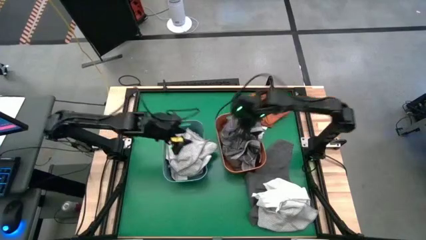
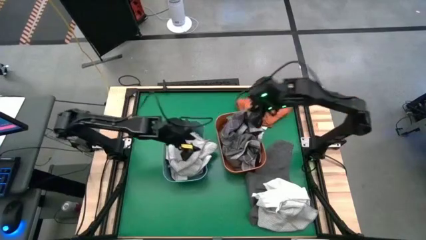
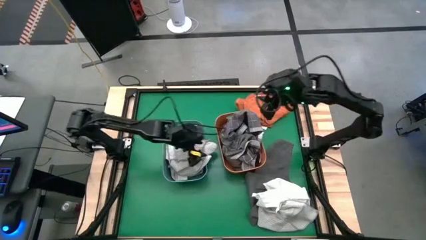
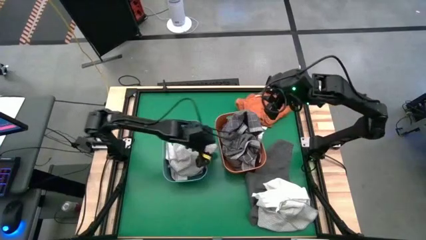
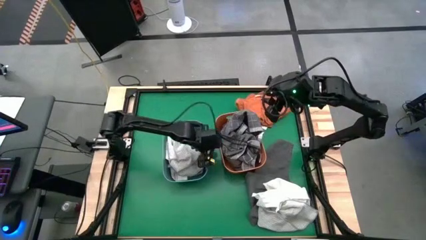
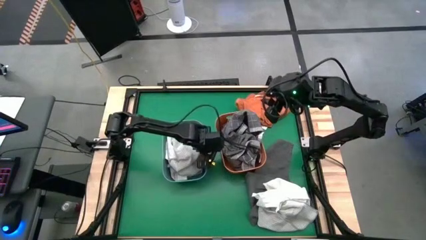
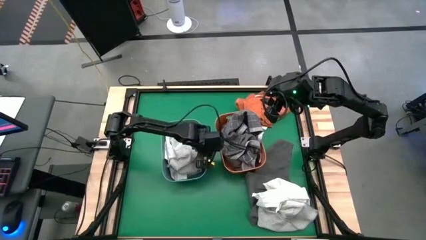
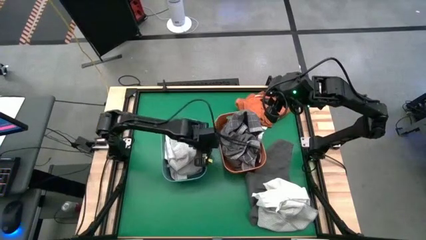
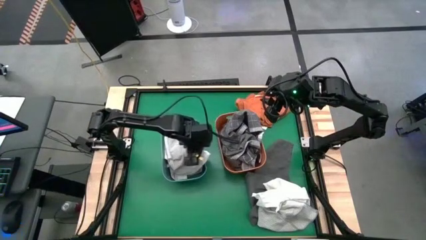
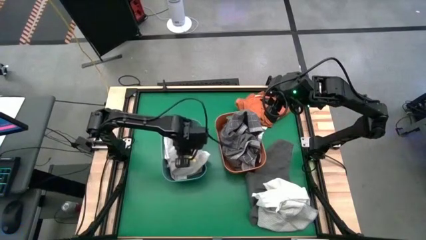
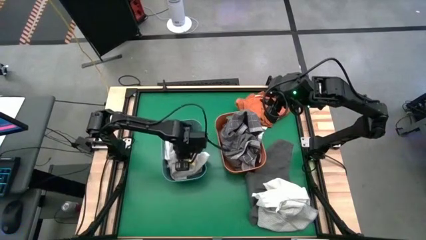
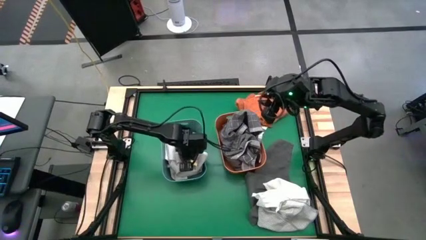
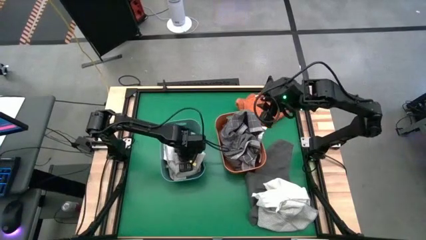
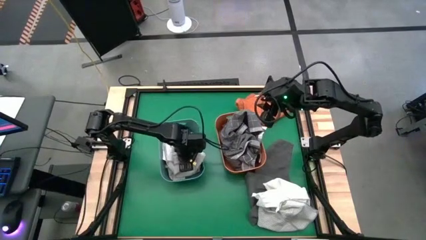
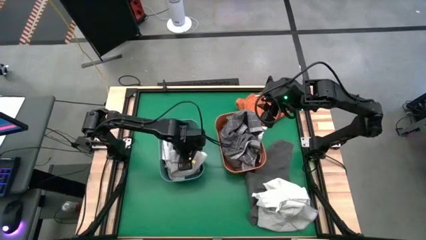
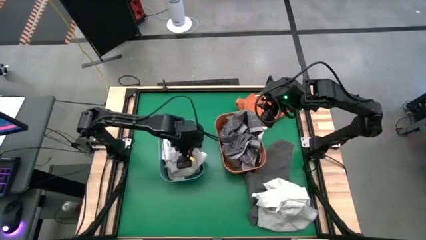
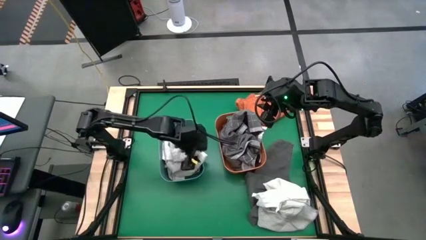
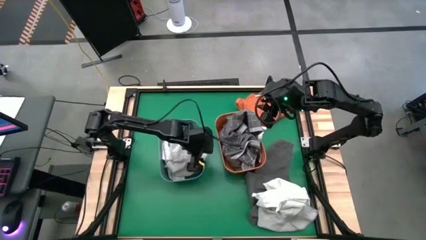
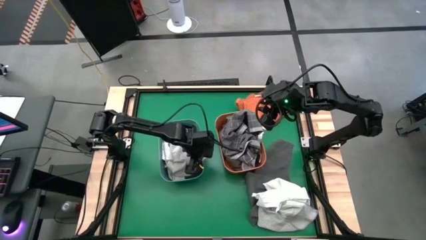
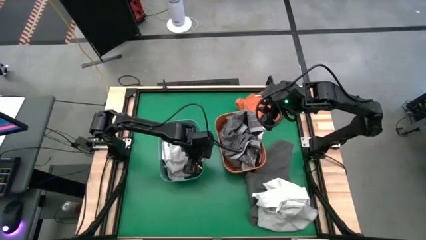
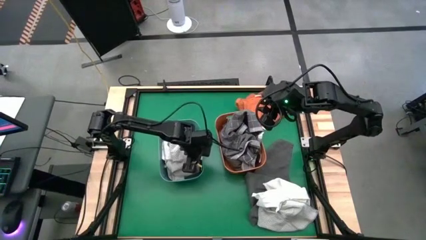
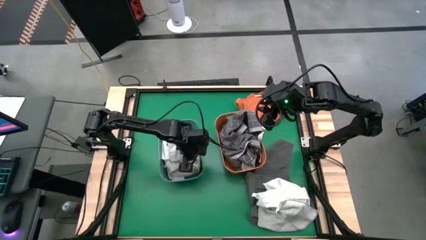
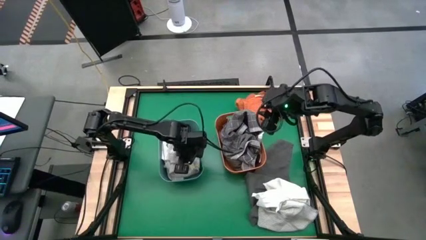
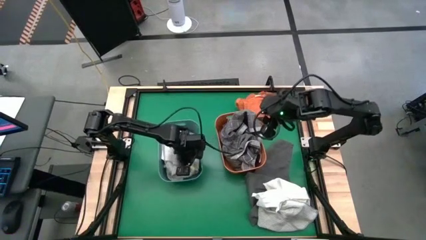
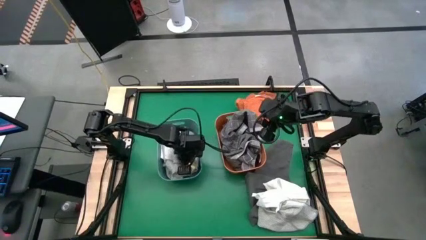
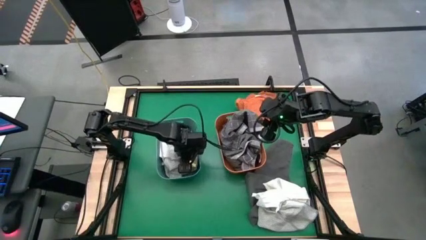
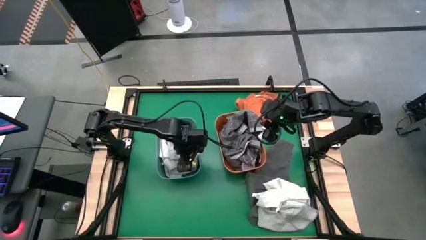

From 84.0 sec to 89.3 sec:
Task: Sort towels by color in basket
Adjust the gray towel in the green bin

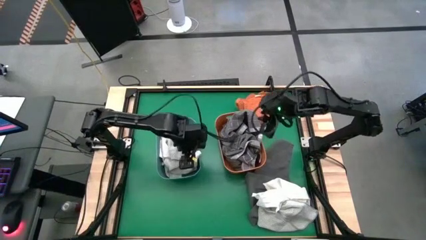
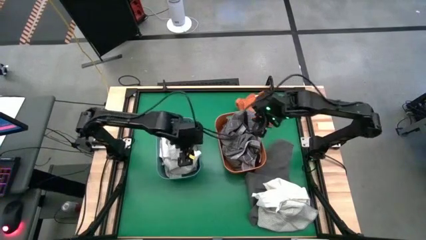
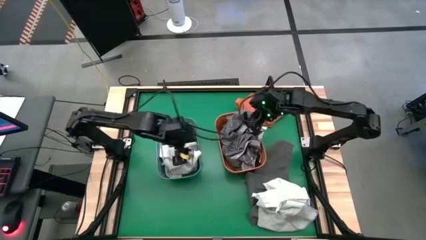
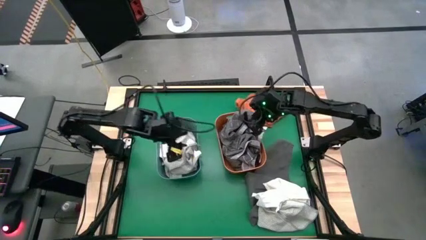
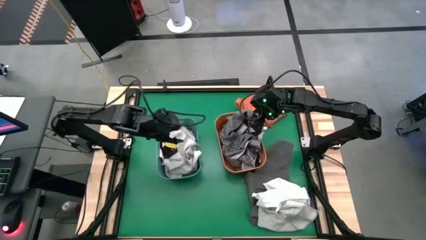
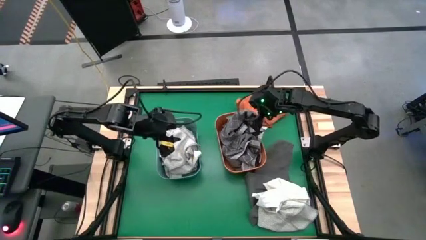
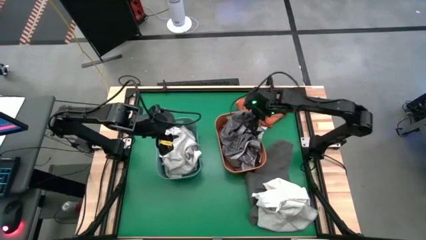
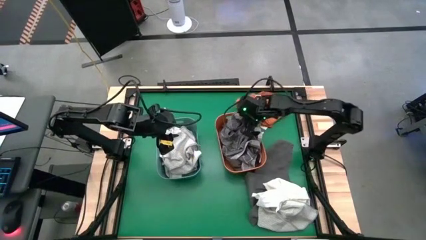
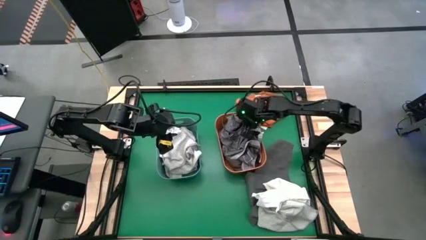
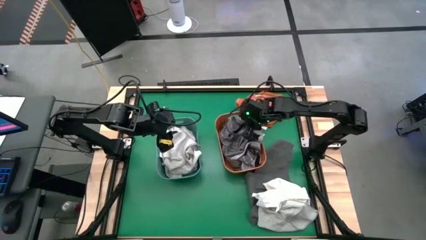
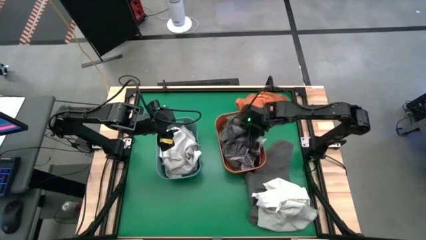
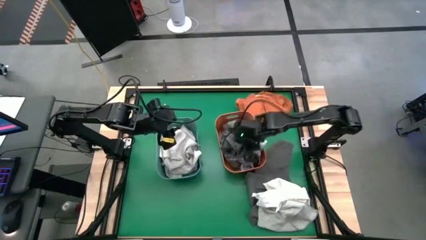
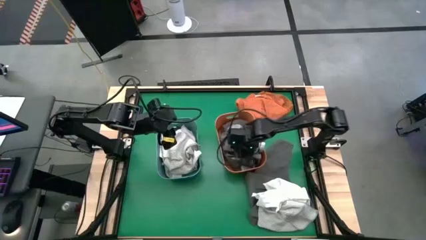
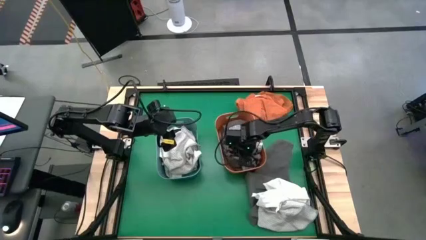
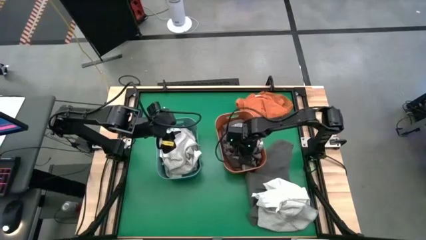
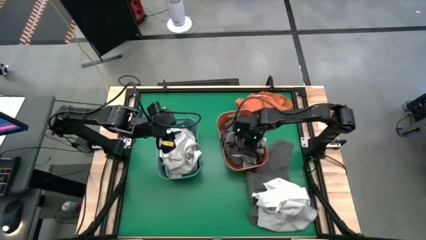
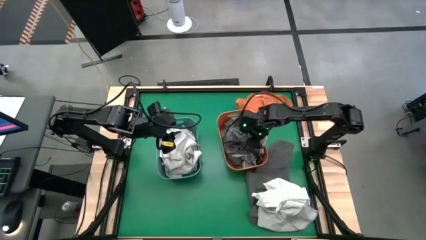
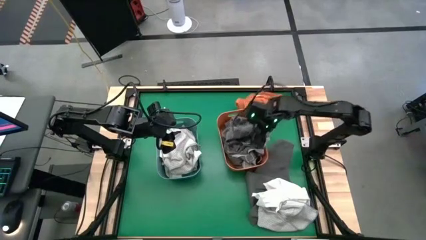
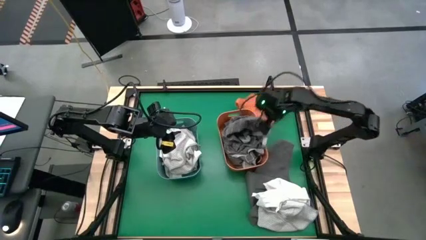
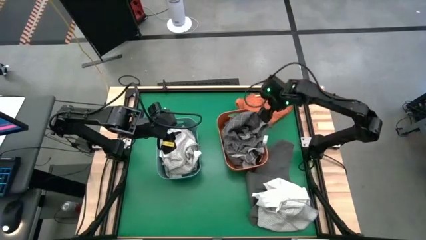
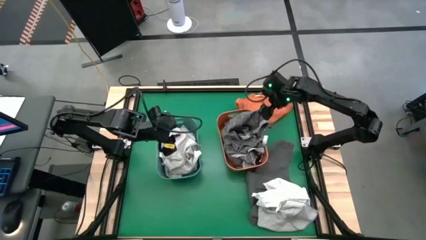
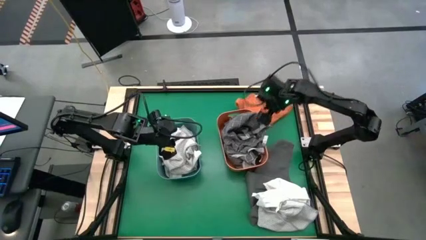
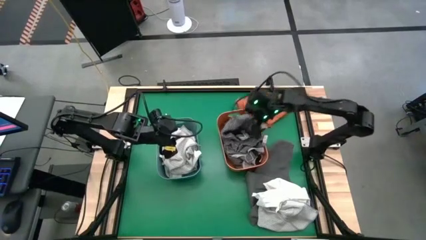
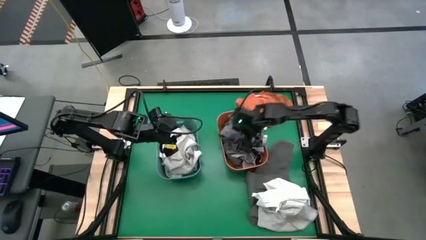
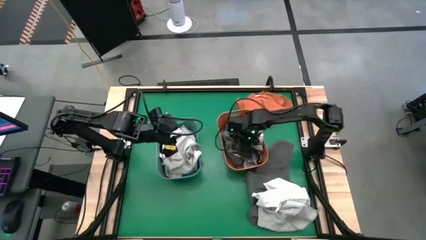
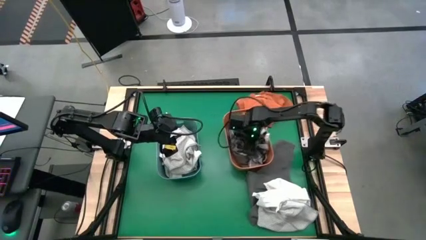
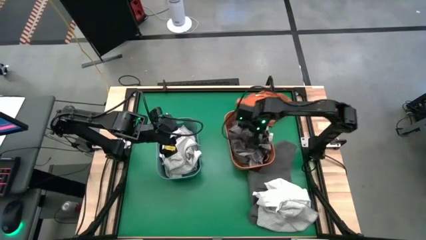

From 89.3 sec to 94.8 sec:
Adjust the gray patterned towel in the orange bin

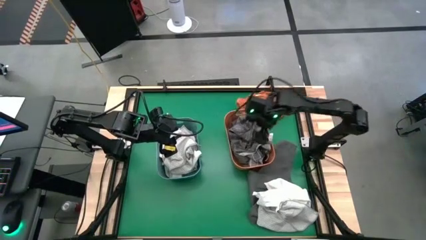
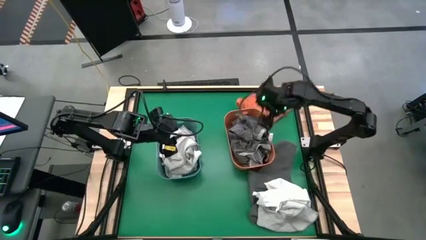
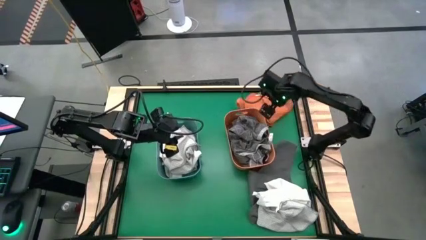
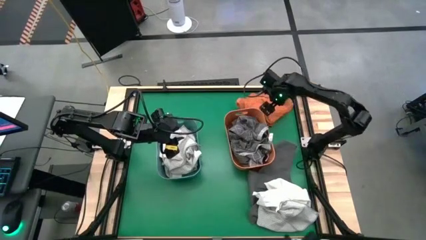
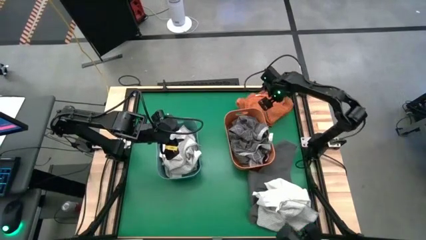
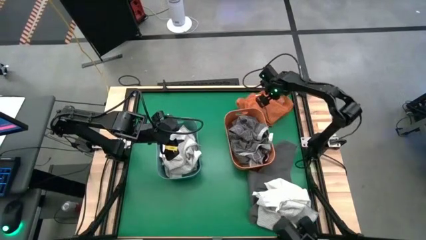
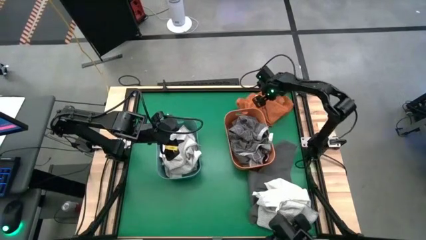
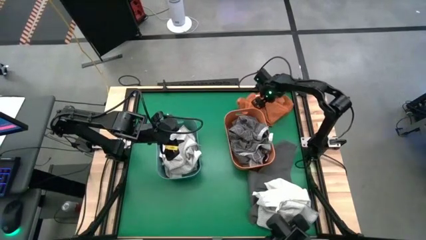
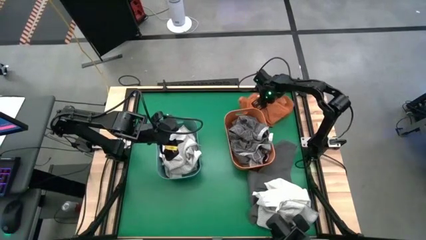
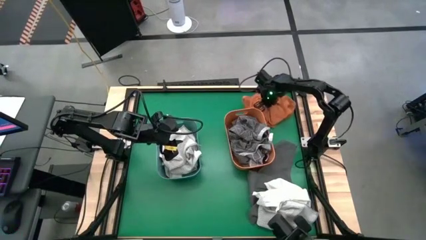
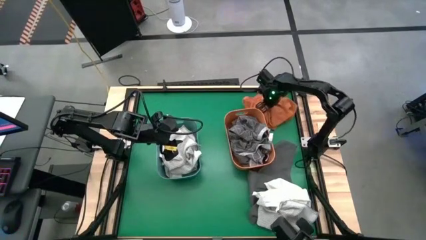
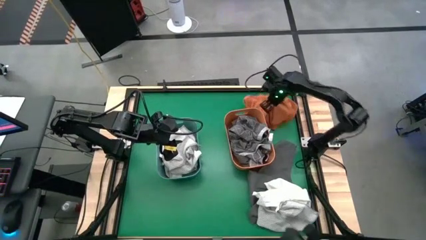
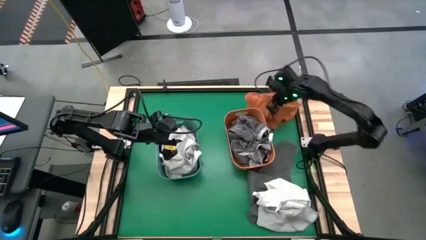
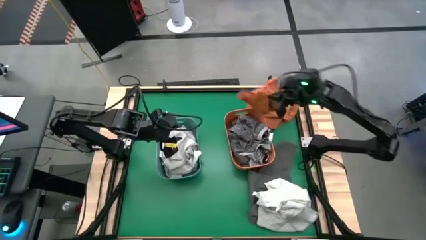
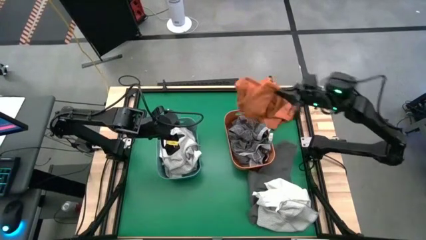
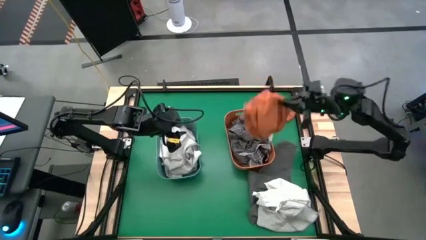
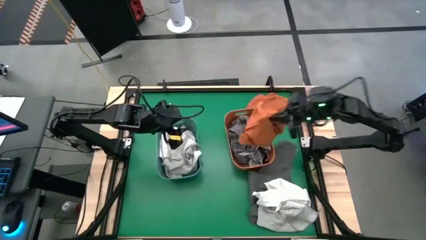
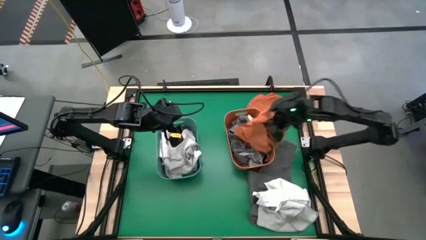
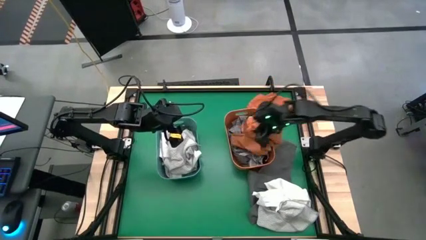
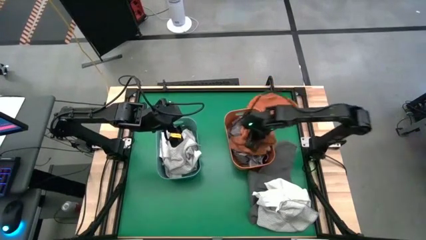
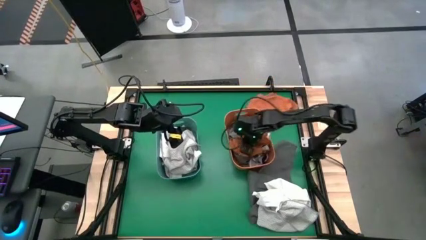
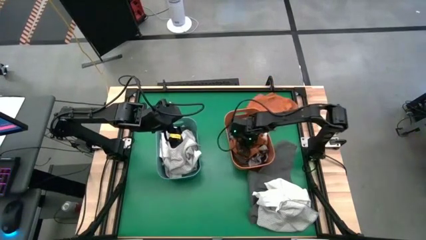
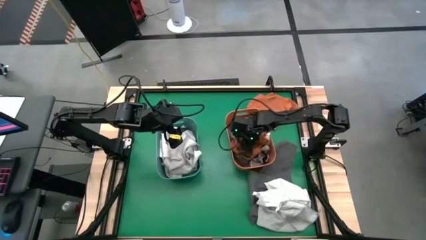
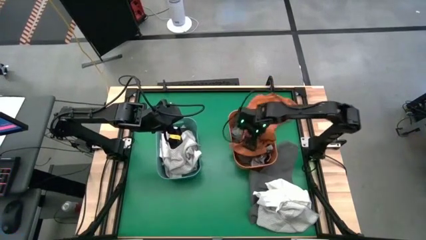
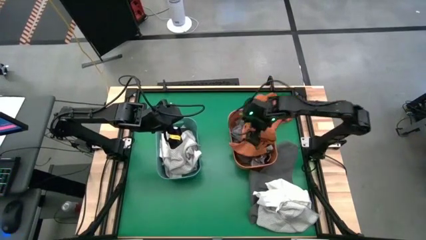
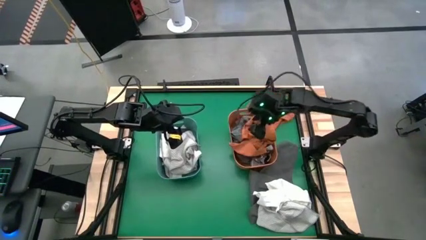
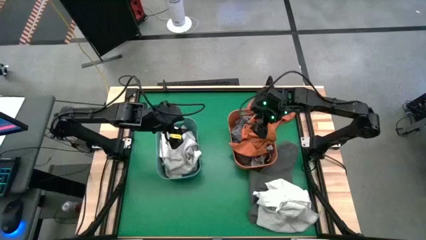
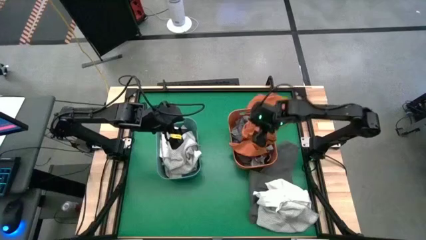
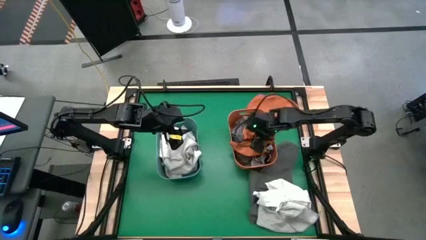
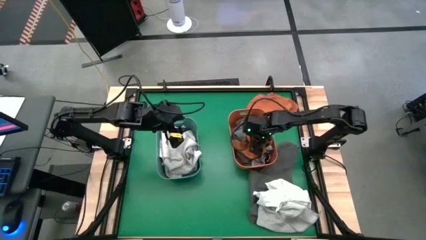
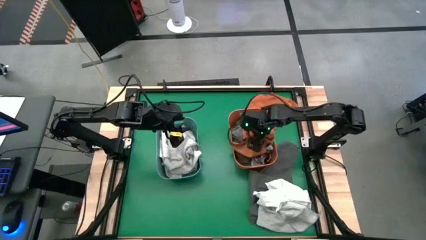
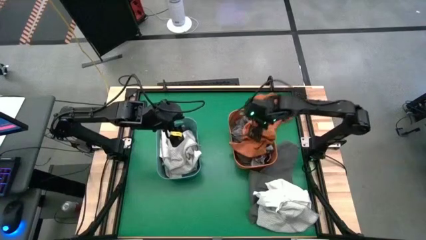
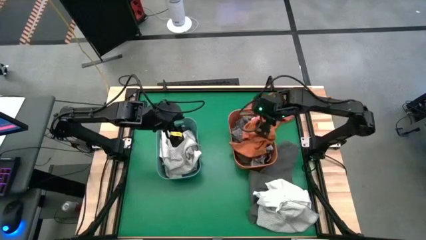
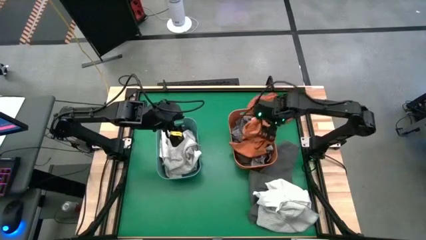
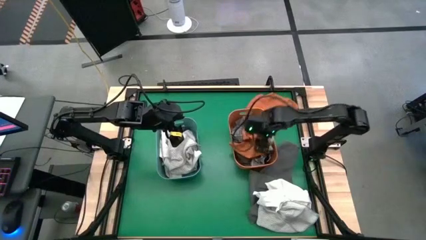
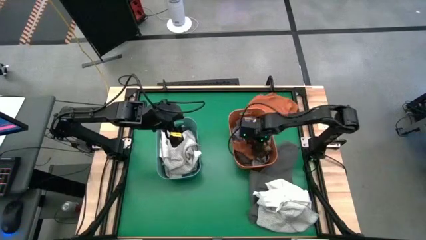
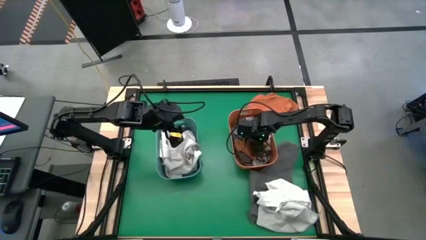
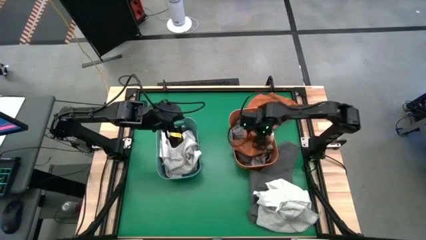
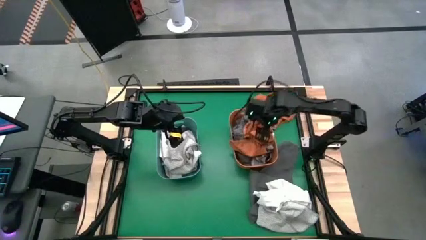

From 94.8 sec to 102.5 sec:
Put the orange towel into the orange bin
